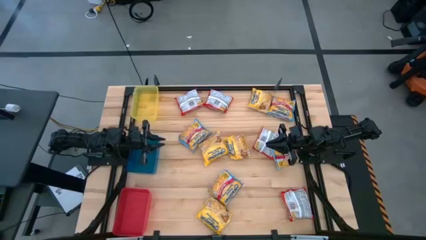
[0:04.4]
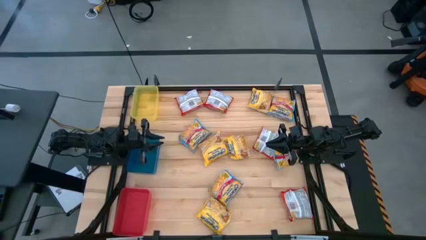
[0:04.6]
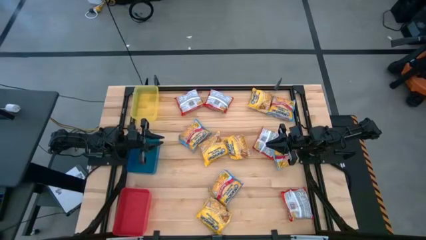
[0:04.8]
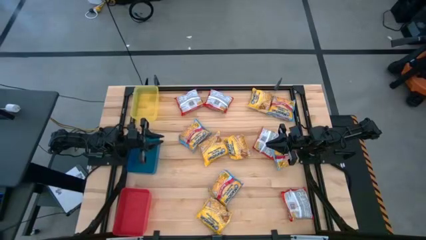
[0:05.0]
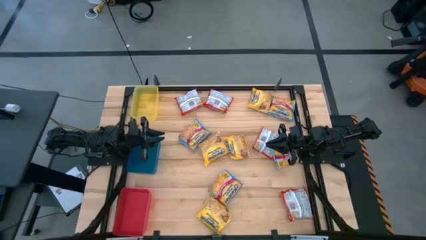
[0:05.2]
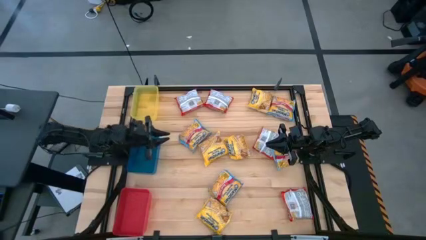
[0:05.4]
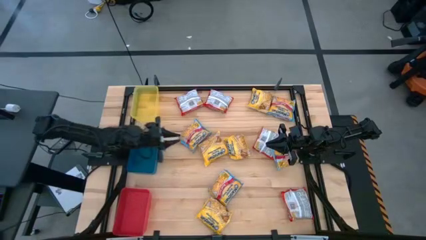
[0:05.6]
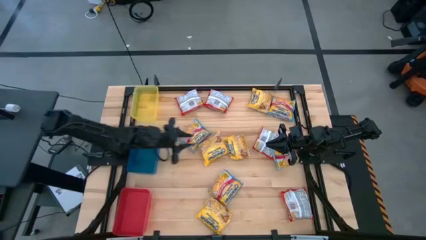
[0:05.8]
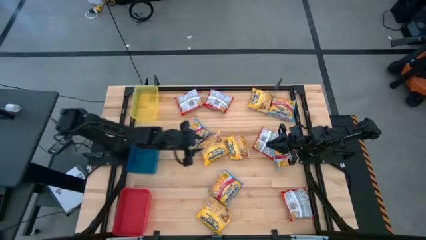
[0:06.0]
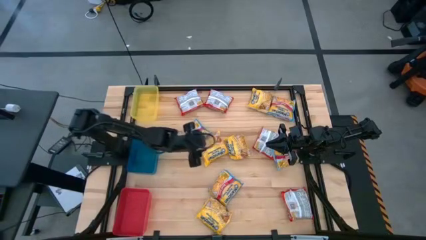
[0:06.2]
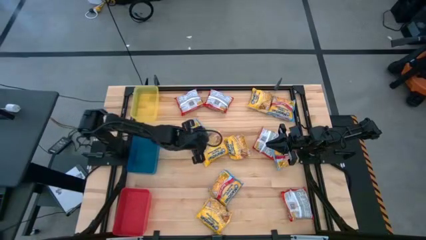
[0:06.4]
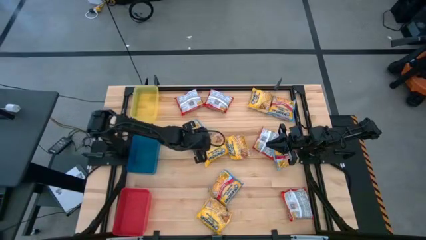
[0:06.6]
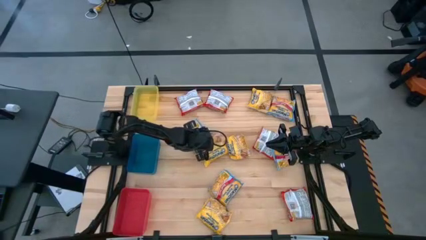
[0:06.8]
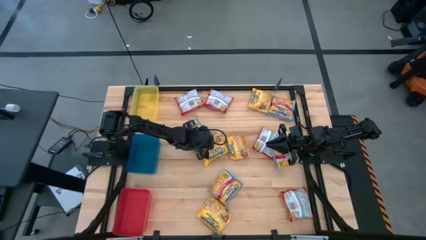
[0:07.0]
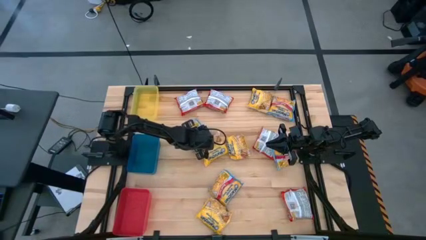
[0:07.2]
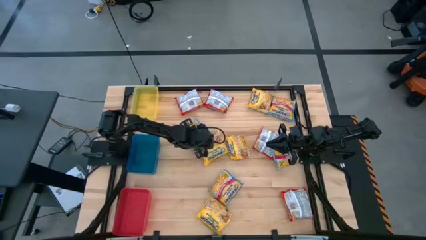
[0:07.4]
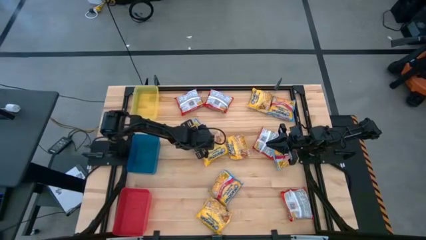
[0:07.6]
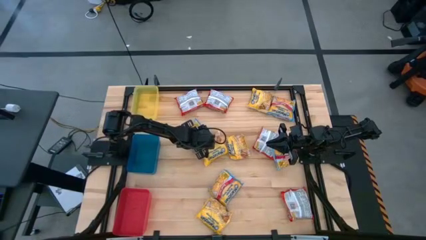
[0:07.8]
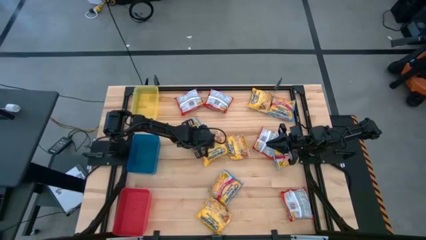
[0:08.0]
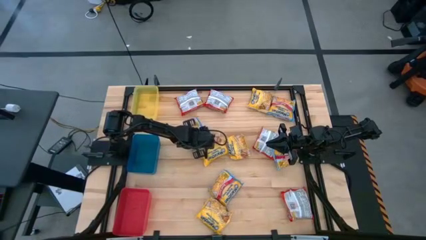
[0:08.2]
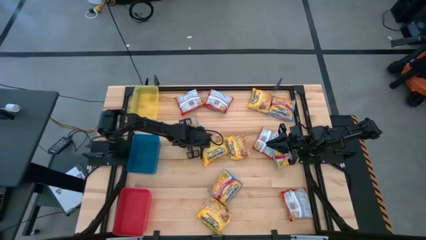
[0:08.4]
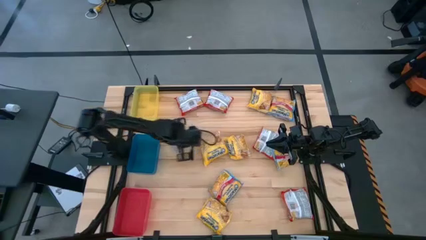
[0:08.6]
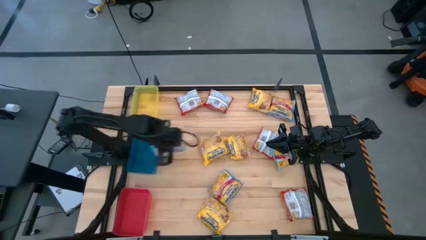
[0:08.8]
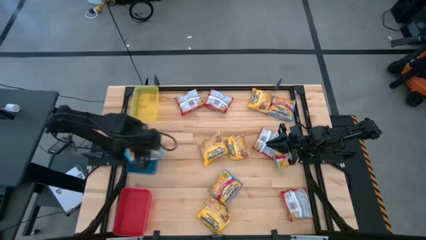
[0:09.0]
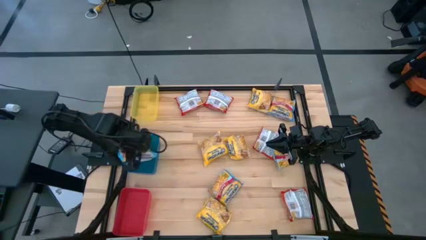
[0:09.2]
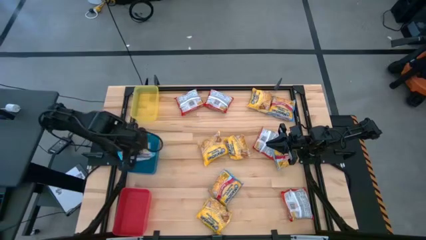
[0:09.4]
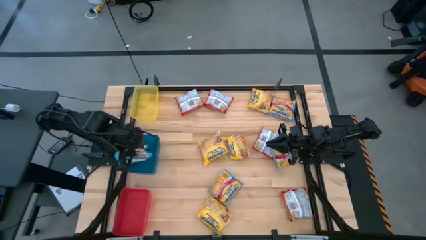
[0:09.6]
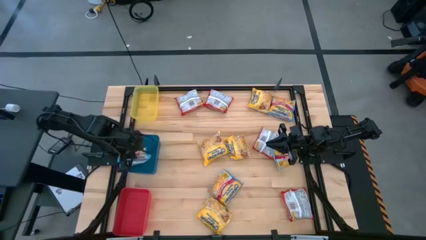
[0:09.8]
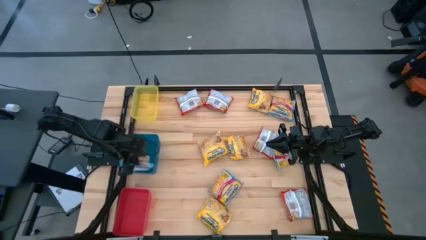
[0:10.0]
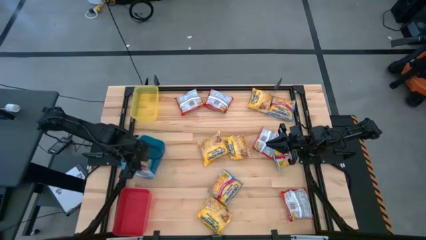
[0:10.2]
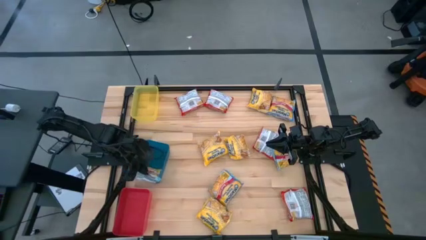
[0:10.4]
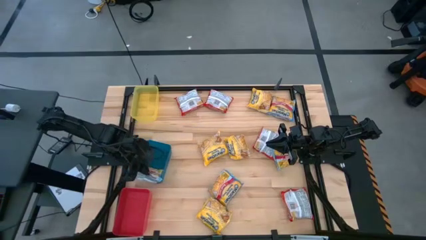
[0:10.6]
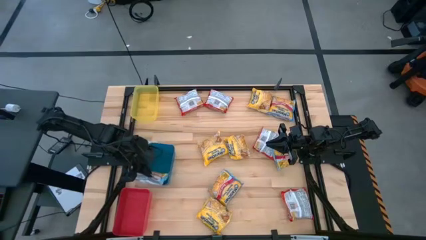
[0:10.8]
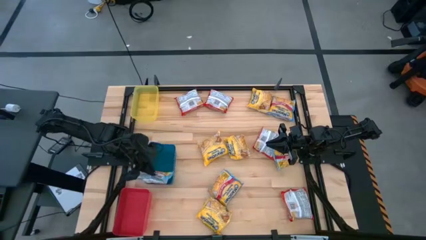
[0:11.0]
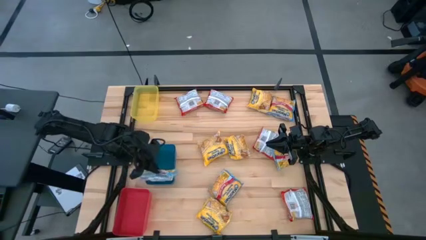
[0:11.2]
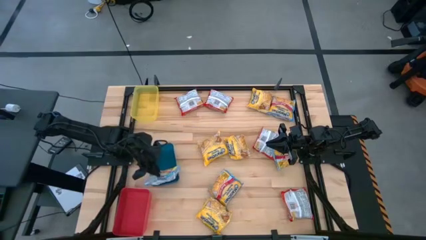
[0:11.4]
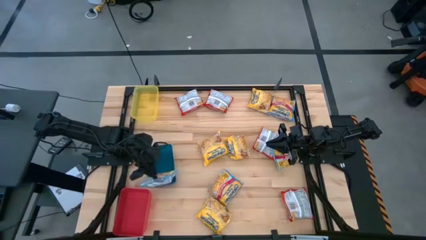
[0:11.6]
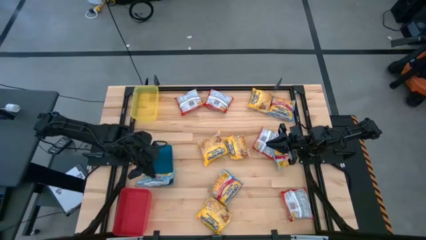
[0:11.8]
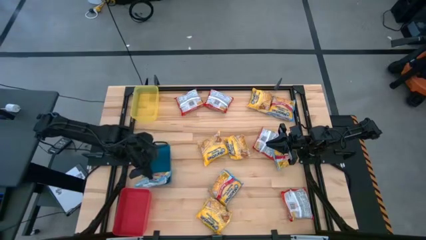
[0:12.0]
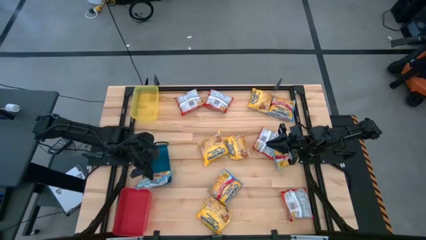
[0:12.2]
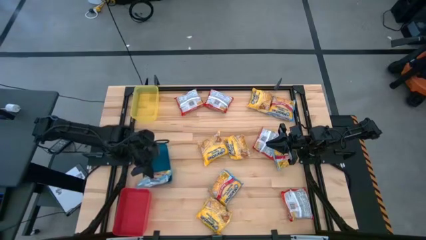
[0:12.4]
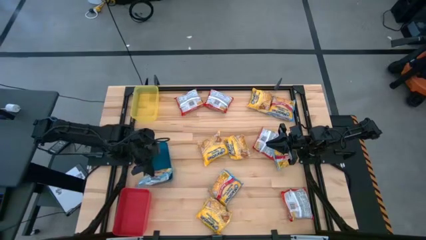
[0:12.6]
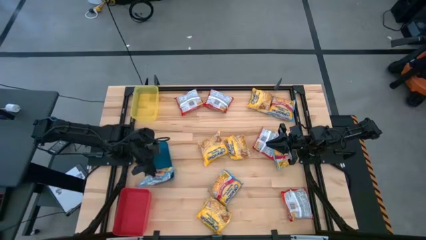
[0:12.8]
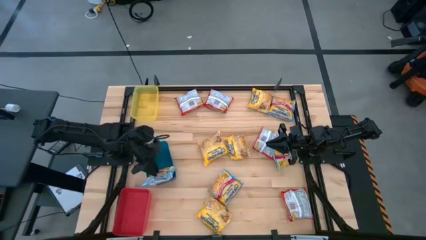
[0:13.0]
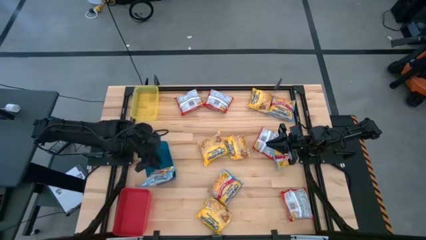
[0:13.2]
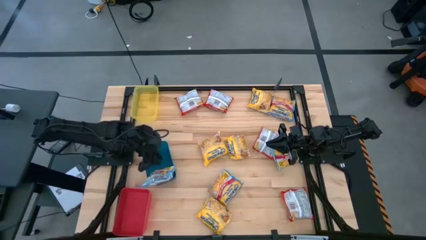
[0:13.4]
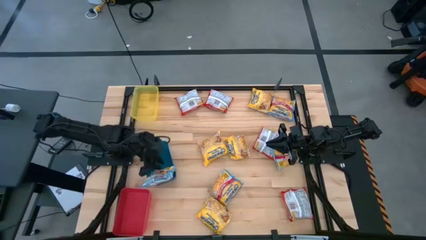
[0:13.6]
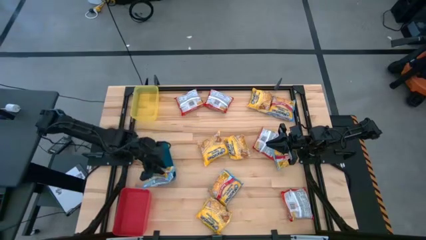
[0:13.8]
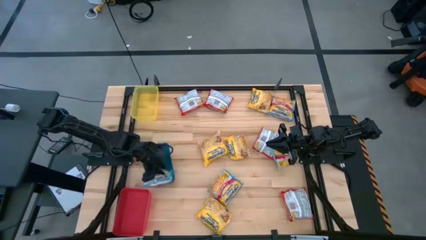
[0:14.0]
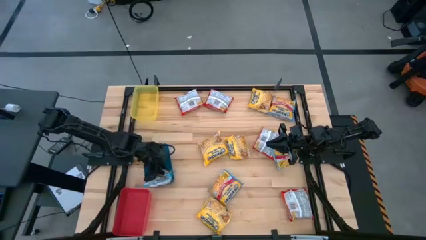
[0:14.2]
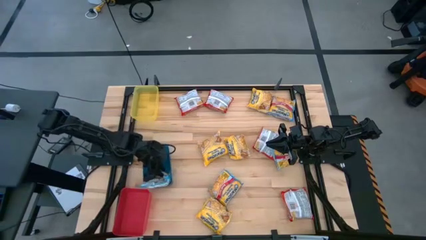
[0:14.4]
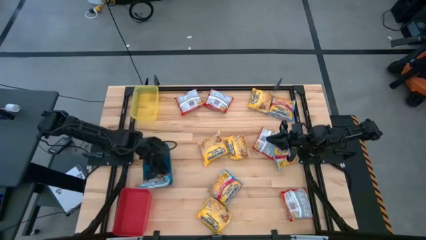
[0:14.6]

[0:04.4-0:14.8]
Task: Sort Maruchan noodles
Put the middle left blue noodle pack into the blue bin

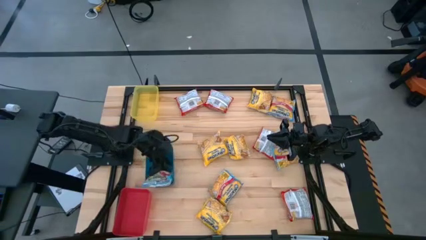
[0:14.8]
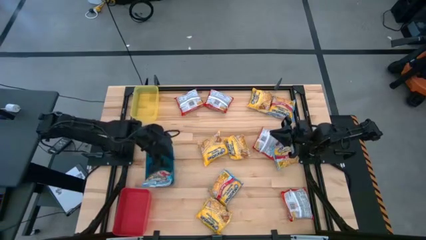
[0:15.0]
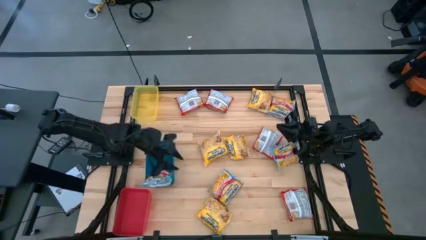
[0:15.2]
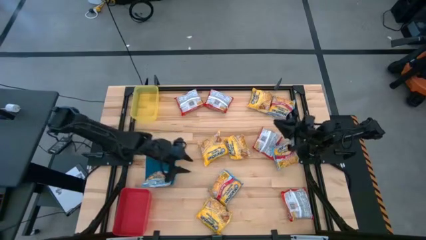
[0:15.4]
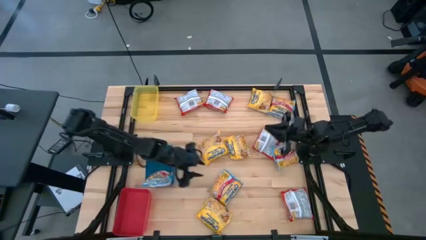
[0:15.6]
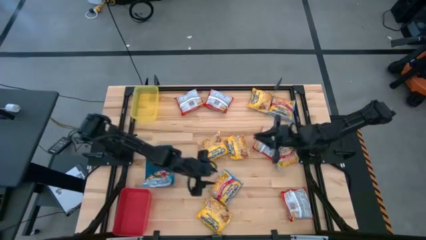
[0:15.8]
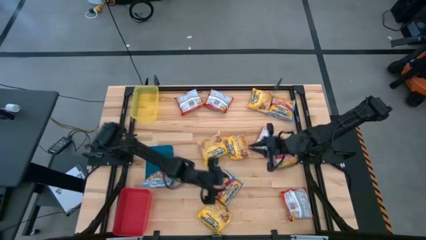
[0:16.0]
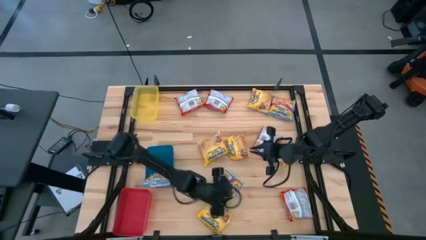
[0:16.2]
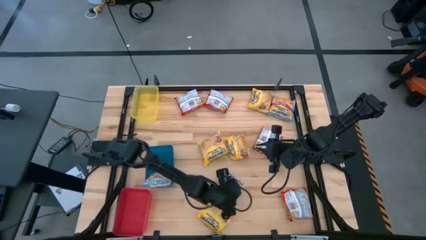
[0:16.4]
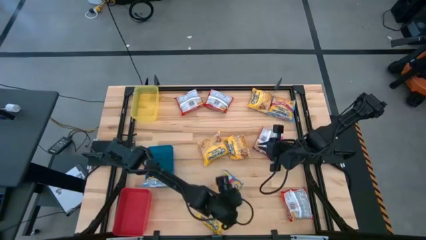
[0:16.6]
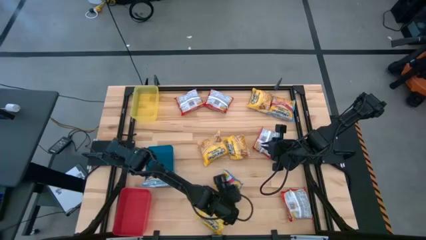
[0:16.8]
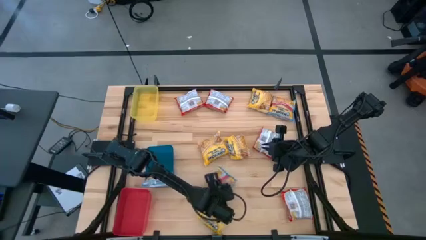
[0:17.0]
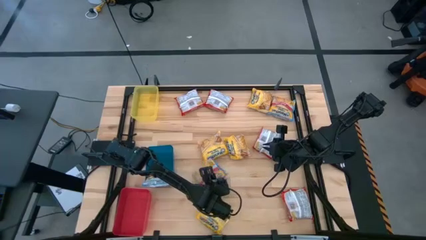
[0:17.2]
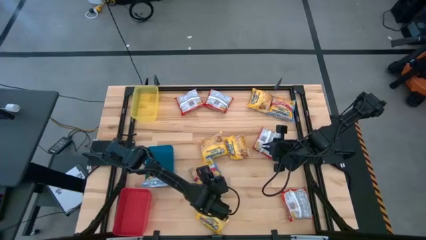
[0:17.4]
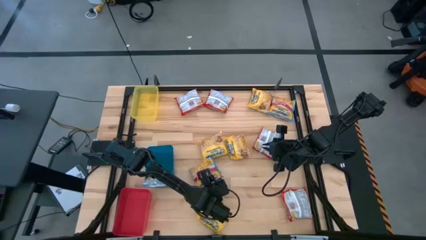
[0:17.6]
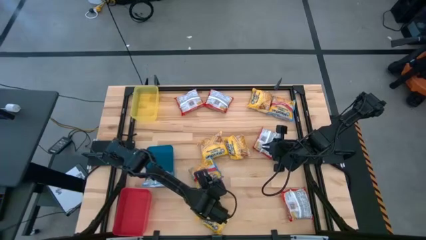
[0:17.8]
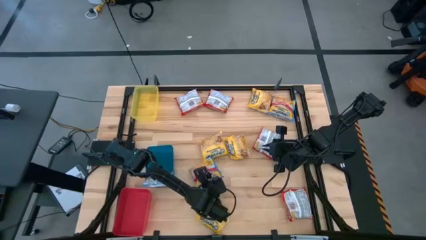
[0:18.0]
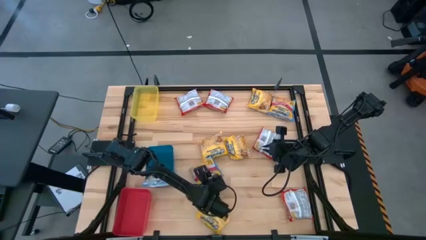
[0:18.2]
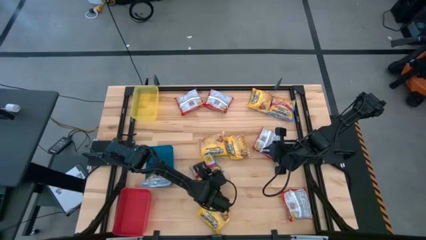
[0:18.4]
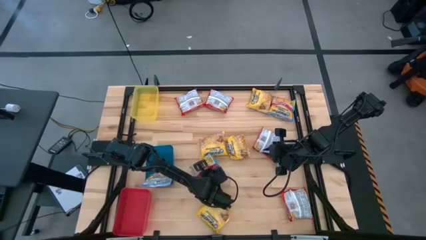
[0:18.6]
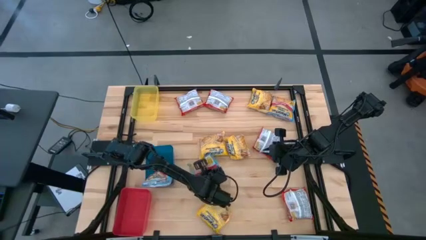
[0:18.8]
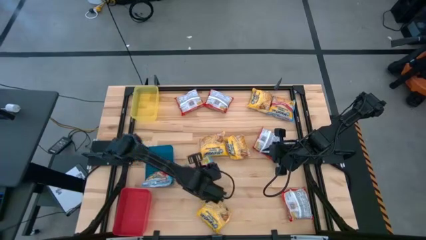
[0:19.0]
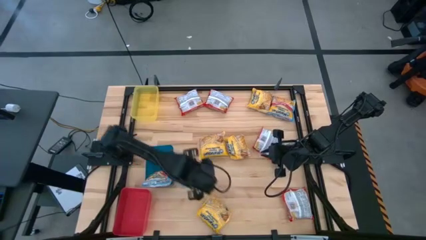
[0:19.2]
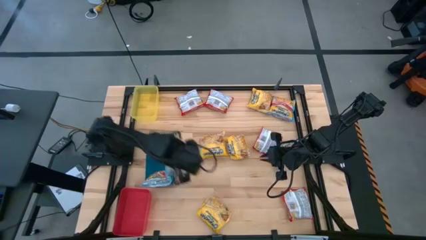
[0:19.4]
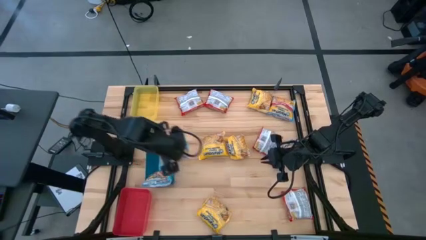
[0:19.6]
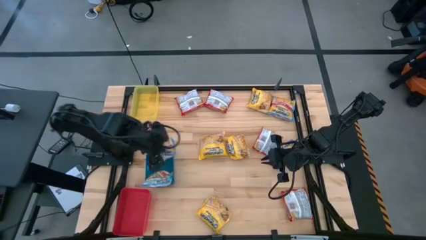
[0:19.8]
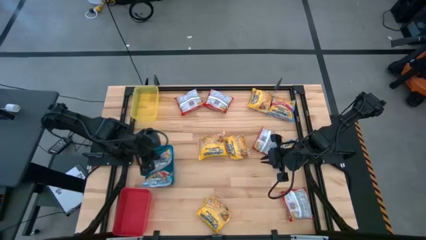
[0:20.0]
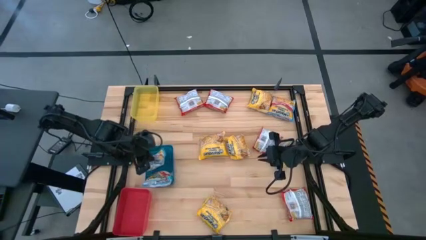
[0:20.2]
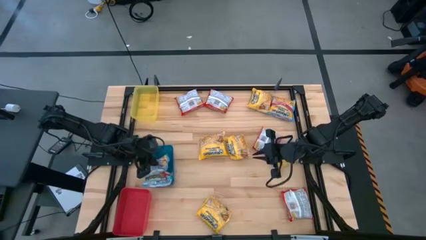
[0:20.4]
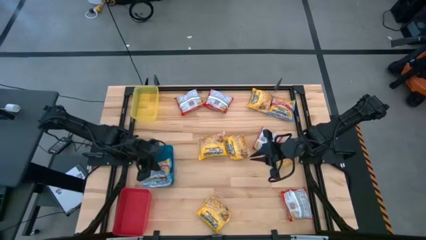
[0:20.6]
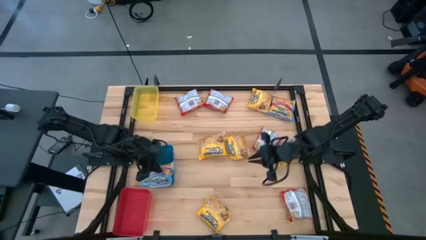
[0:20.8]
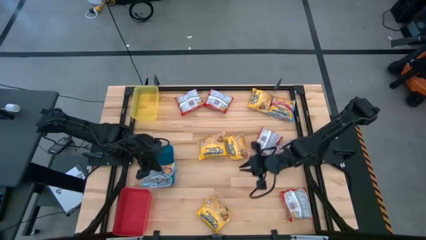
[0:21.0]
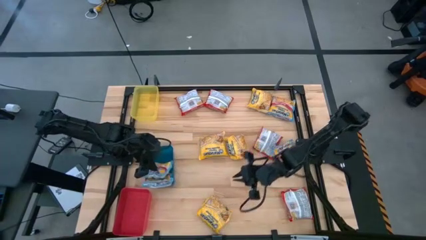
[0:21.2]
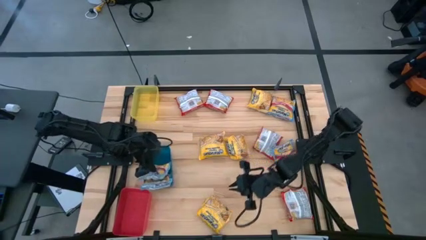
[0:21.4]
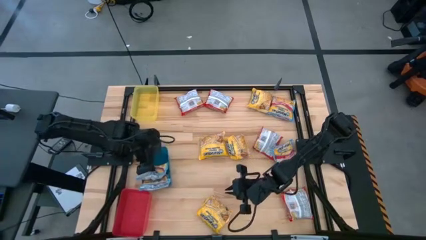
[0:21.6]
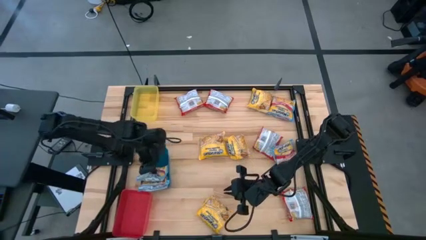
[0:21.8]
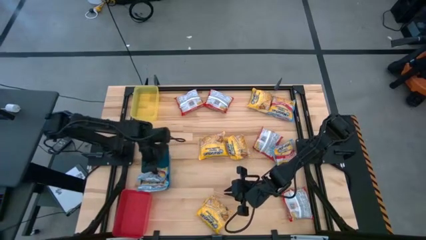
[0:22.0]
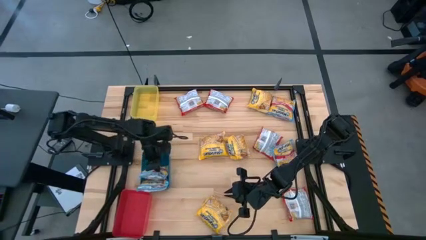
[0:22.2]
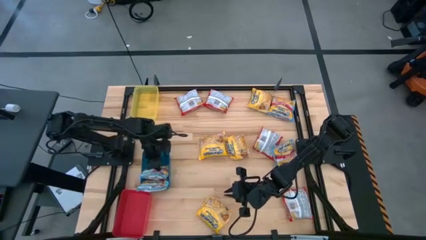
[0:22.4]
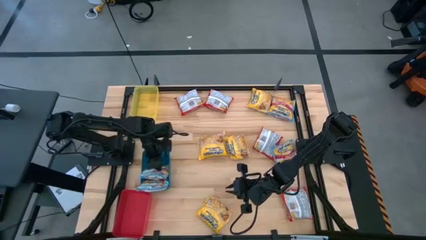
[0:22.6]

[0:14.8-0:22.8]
Put the bottom blue noodle pack into the blue bin
